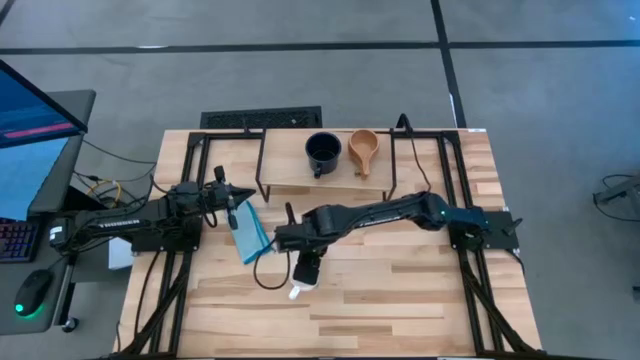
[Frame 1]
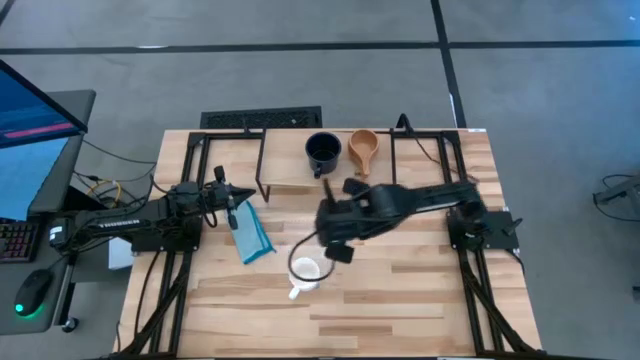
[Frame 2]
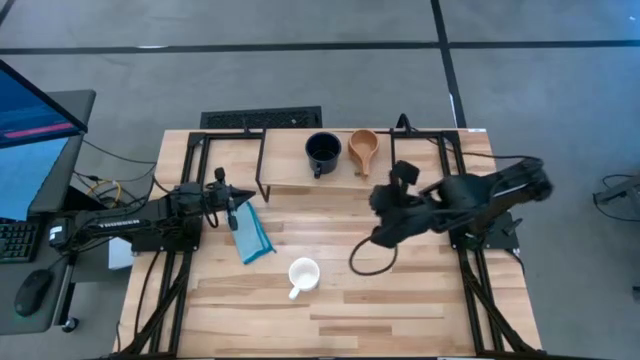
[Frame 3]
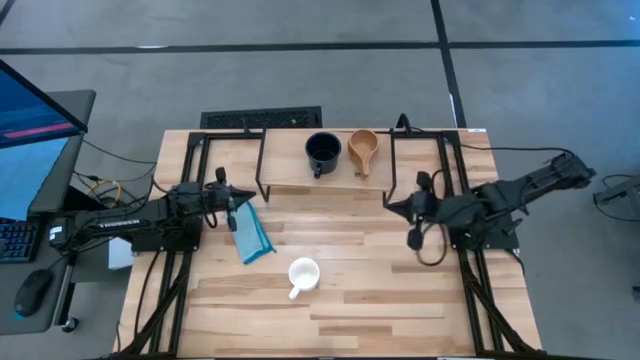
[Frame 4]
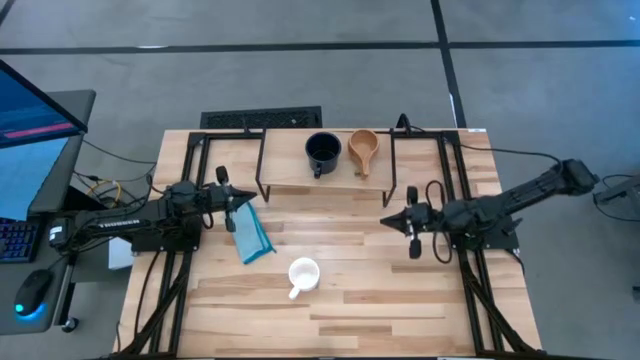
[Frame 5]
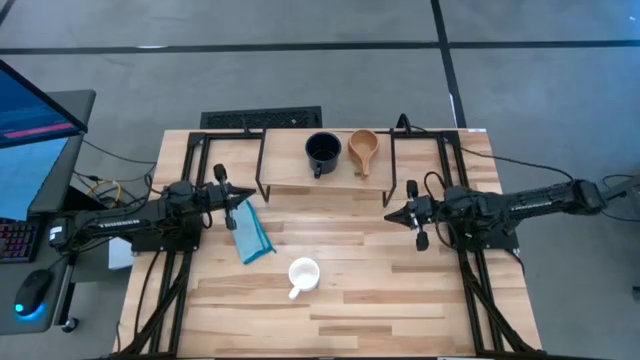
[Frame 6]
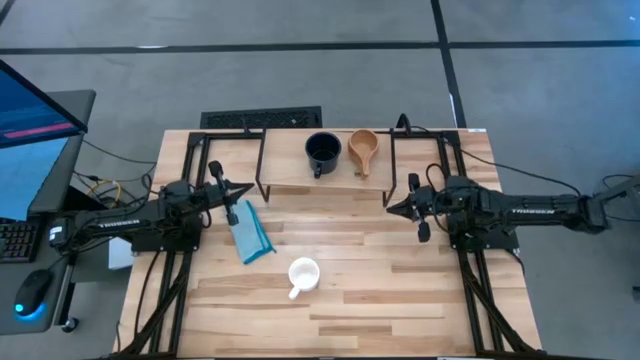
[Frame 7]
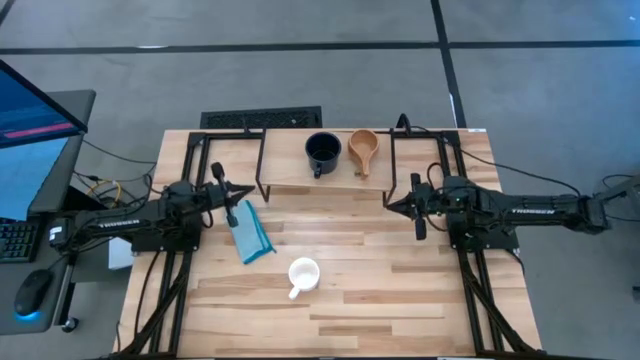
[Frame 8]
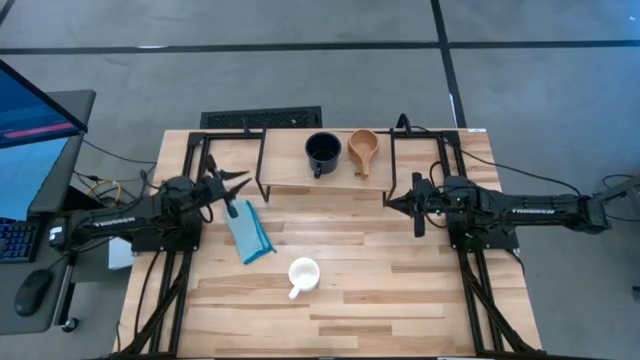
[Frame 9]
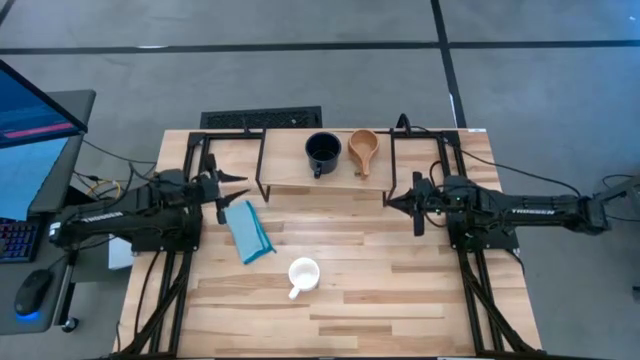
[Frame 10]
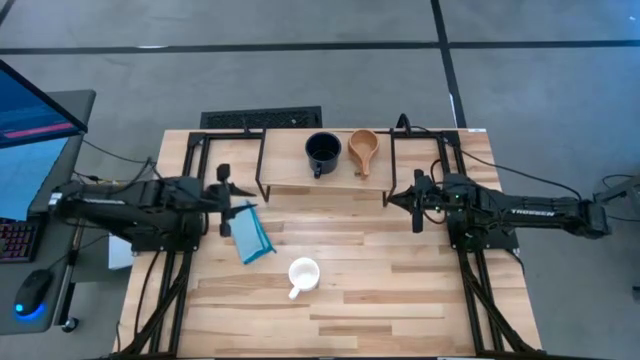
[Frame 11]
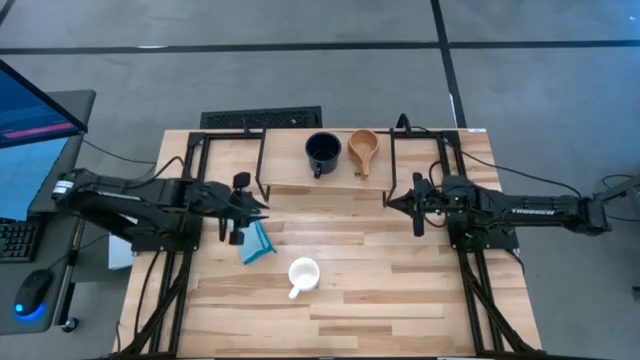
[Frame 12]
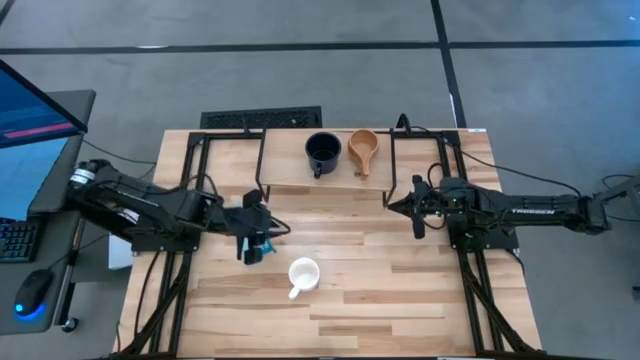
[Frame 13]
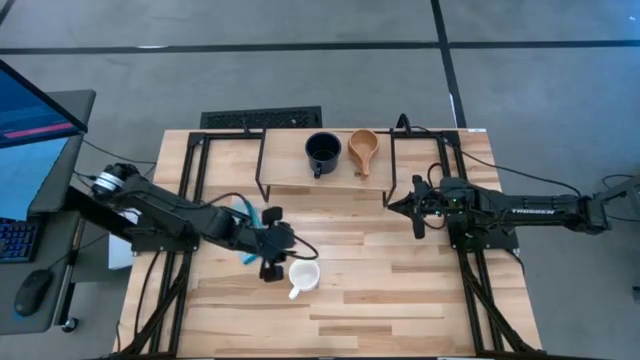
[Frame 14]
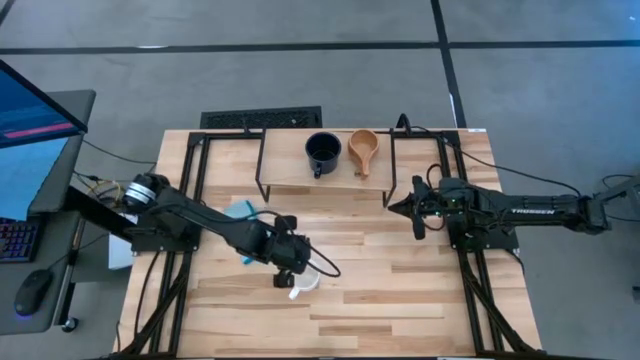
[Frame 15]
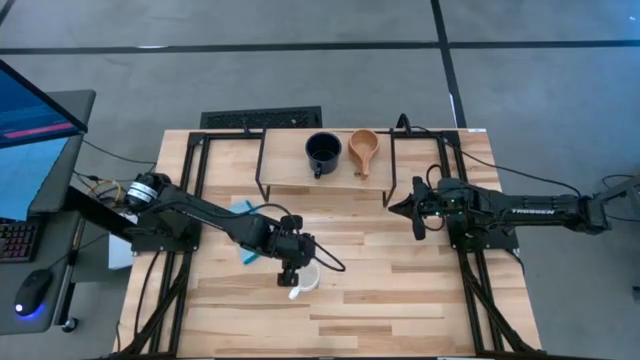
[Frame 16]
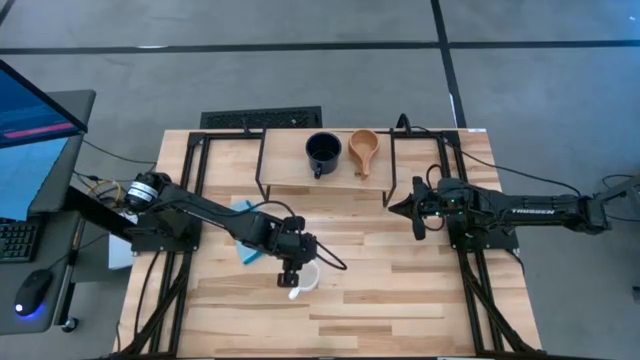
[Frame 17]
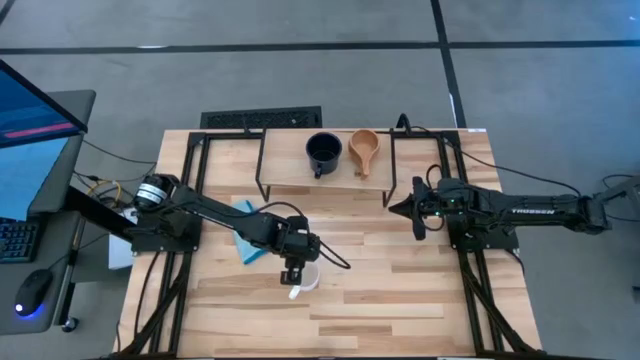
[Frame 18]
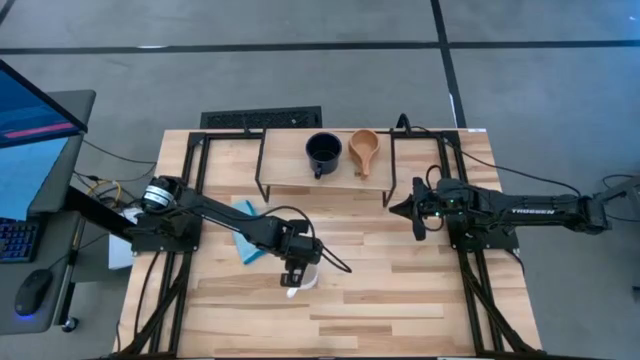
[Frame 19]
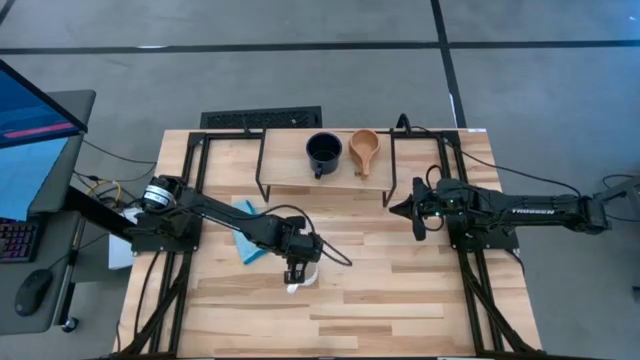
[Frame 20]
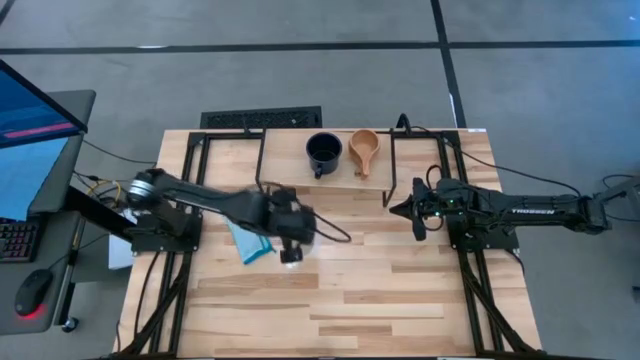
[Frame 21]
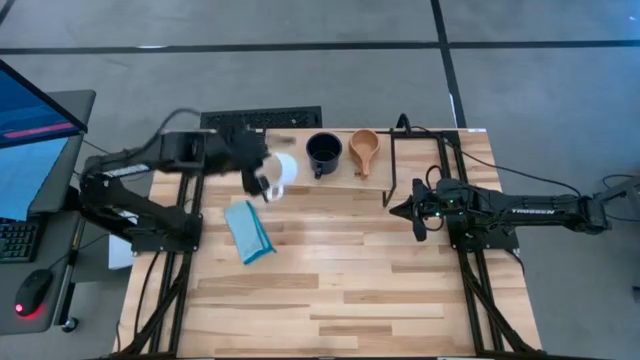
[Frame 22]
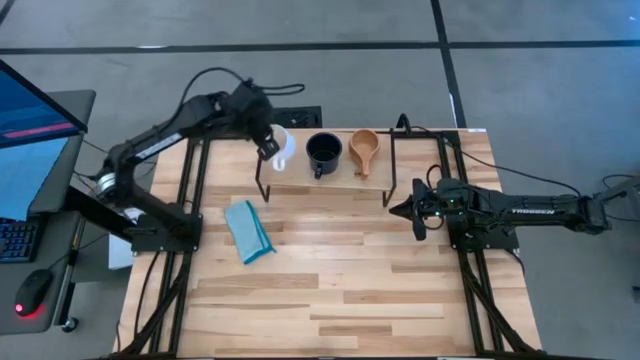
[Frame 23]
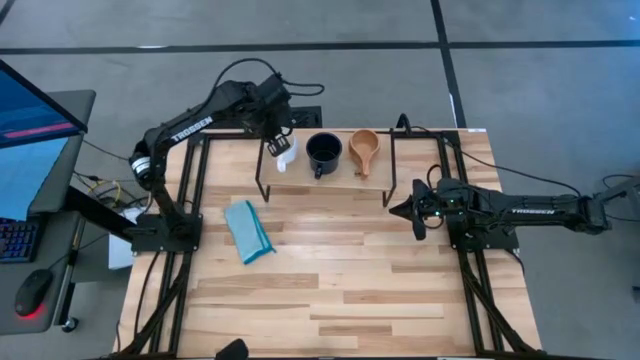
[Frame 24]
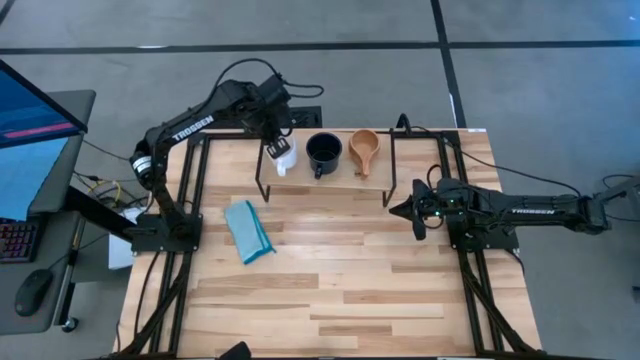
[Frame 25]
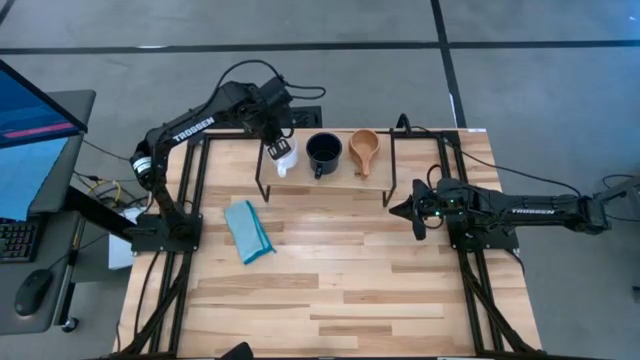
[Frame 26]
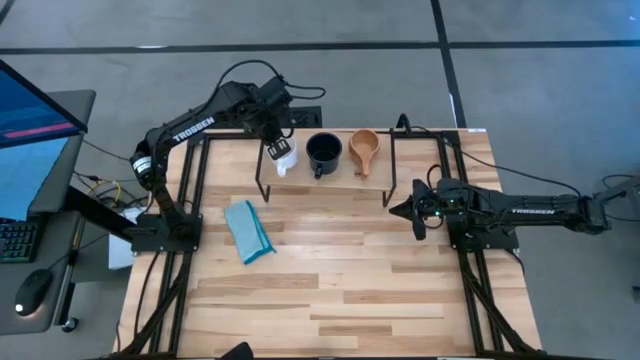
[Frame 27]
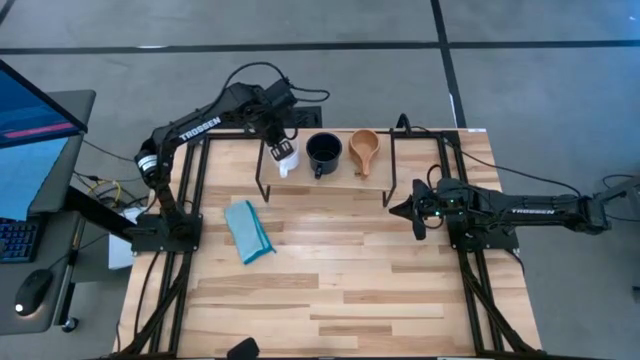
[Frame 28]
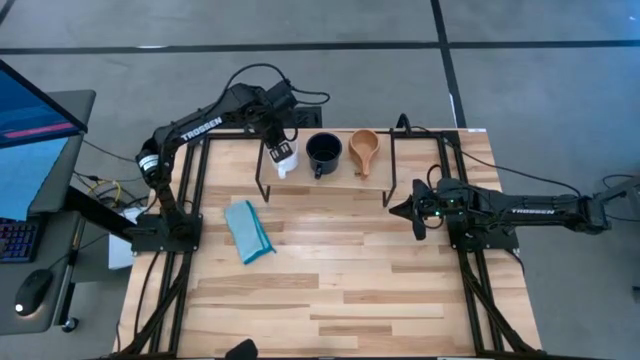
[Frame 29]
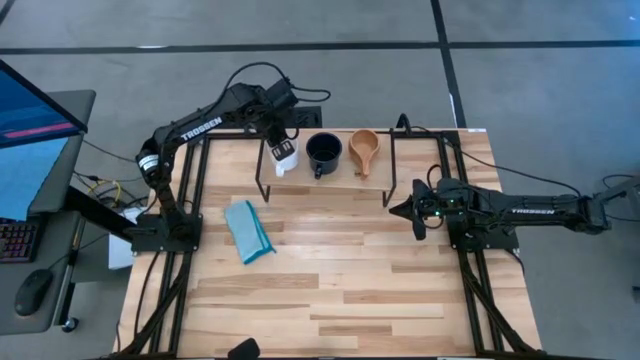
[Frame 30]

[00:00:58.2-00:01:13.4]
Task: Stack small to large cups/mugs on shelf
Put the white mug on the shelf

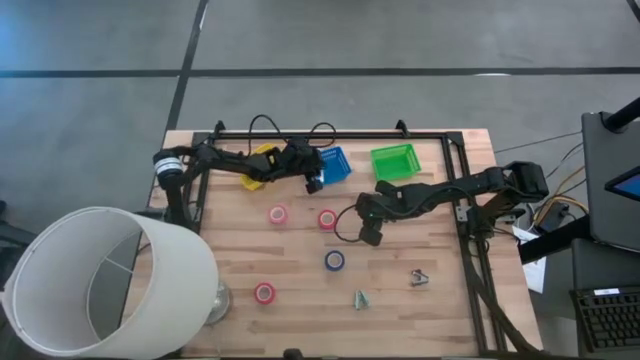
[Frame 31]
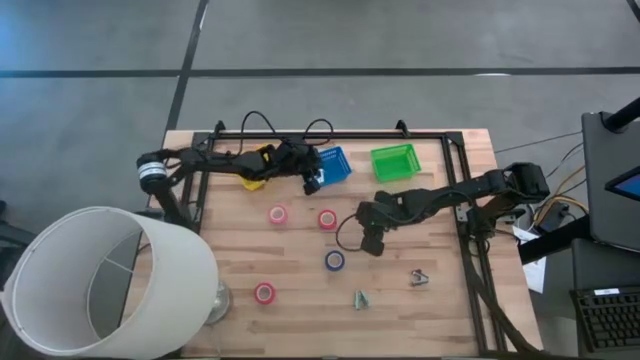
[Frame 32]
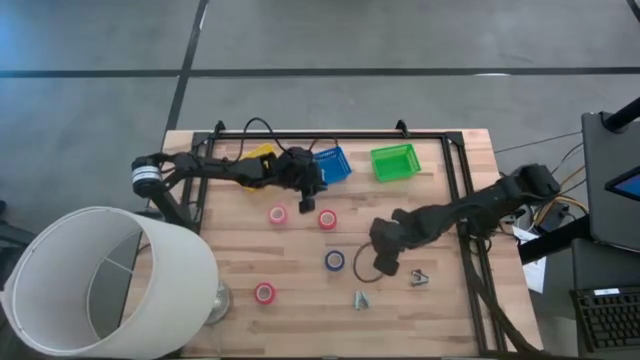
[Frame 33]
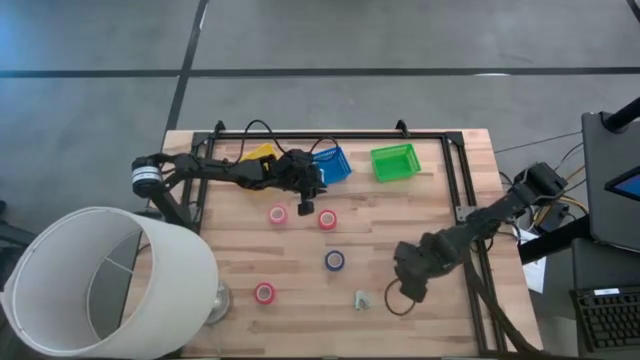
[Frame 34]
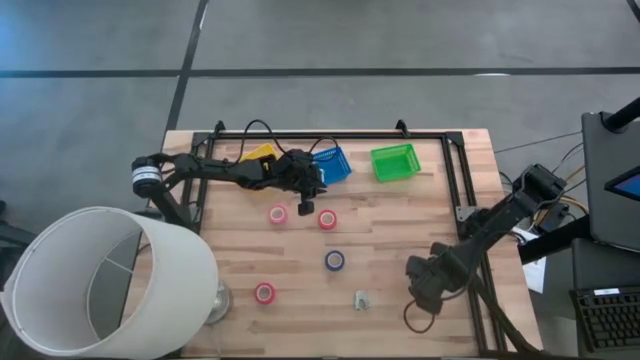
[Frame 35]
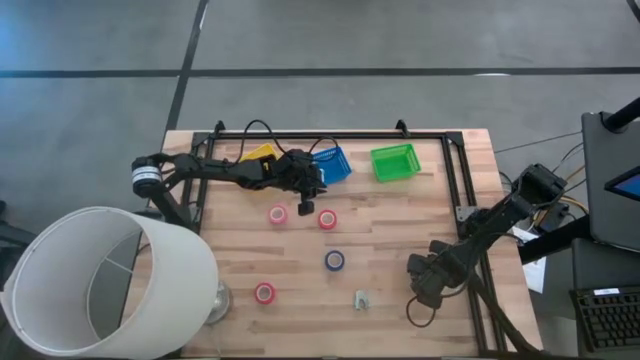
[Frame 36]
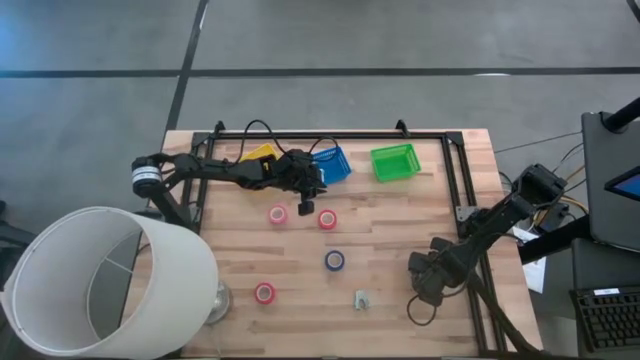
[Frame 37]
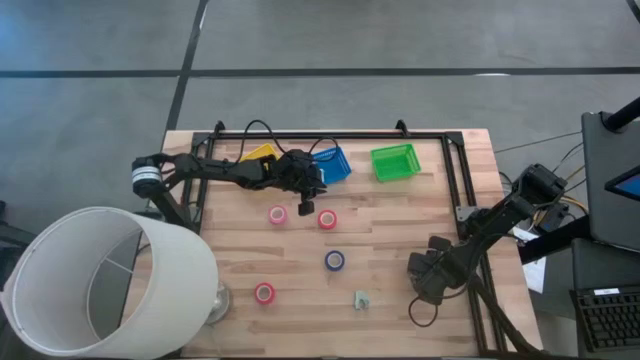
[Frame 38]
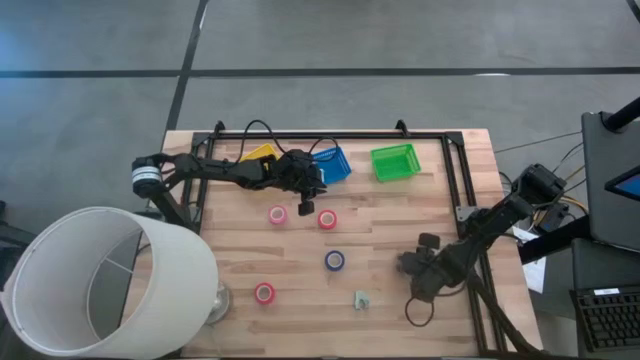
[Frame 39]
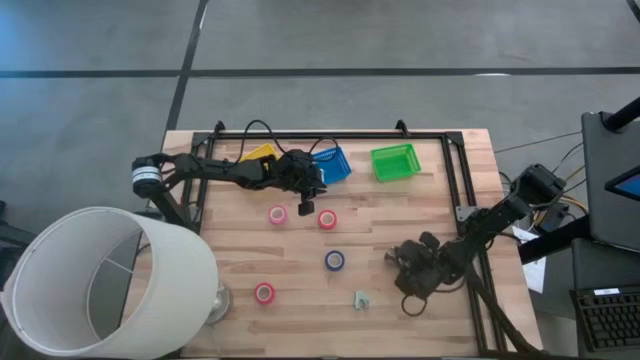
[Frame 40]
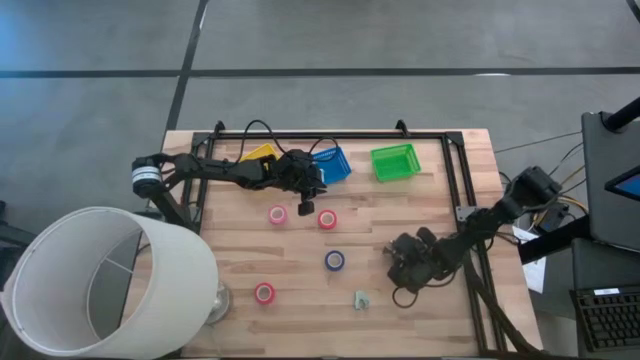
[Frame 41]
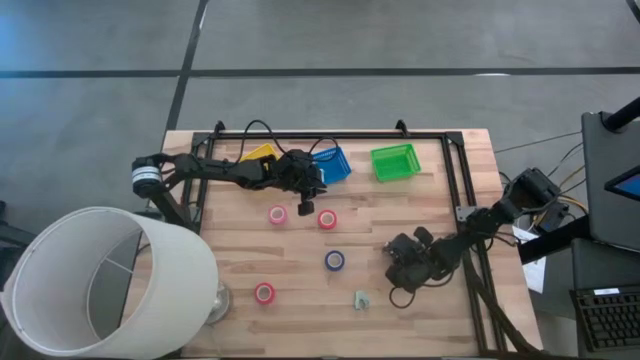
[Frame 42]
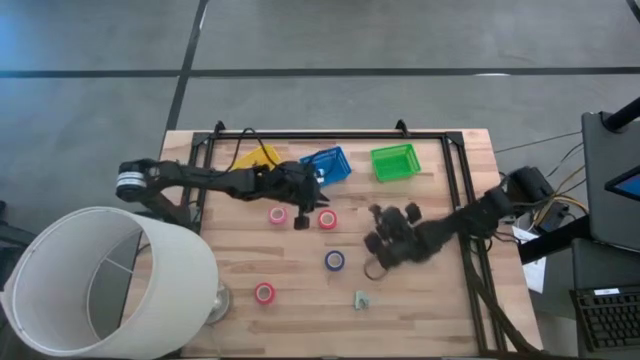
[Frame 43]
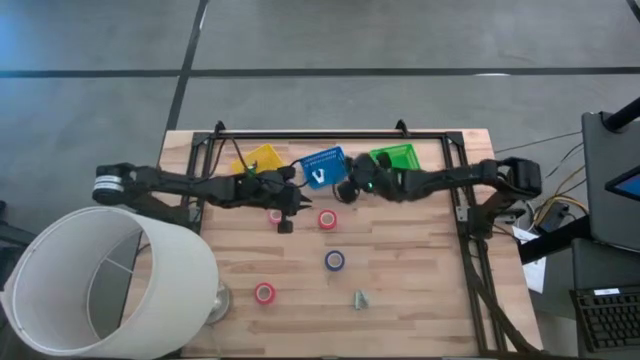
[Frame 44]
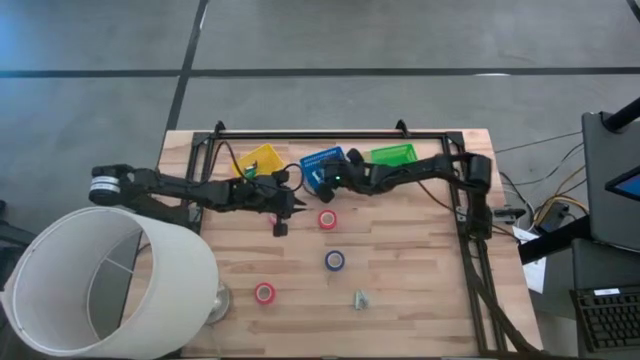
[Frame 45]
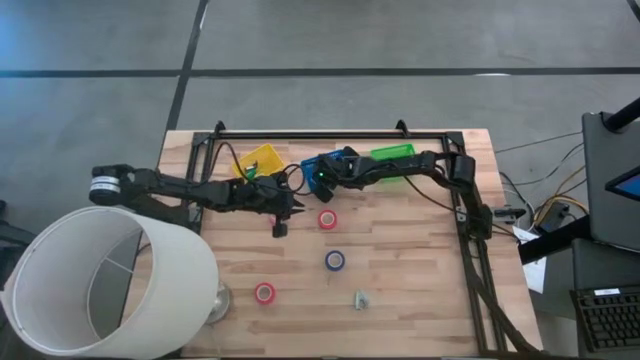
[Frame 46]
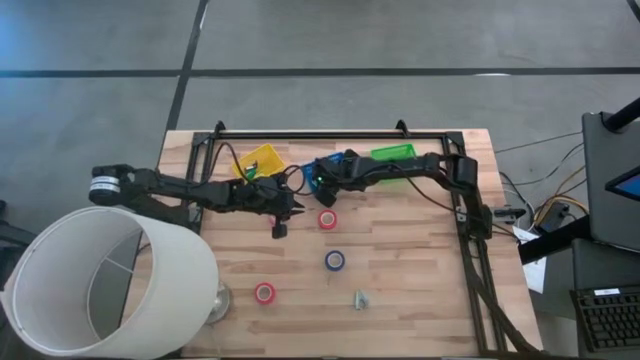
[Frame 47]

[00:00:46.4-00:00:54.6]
Task: Pick and place Stapler, Stapler remover, tape
Put the black staple remover into the blue basket
